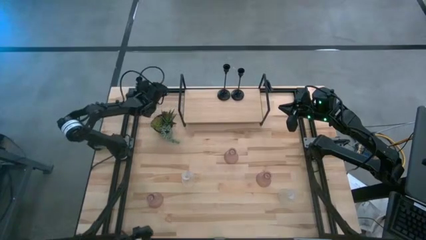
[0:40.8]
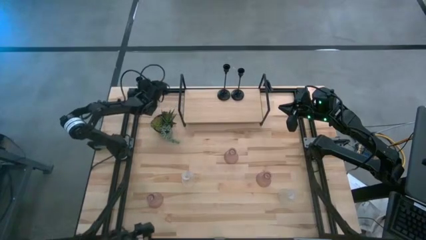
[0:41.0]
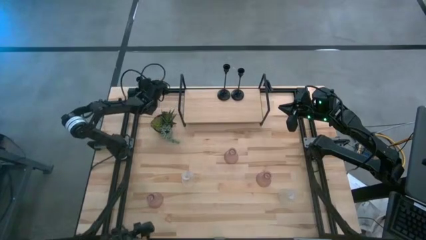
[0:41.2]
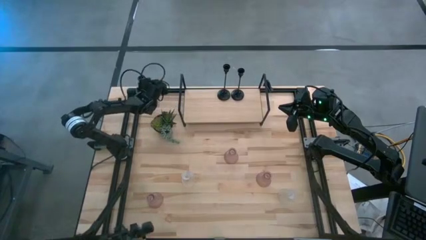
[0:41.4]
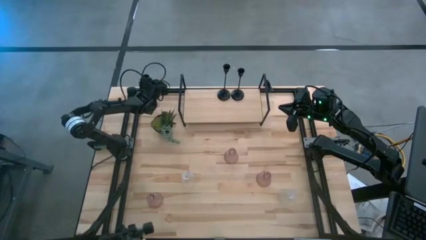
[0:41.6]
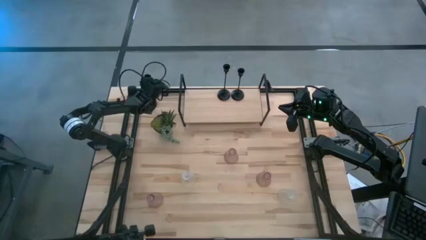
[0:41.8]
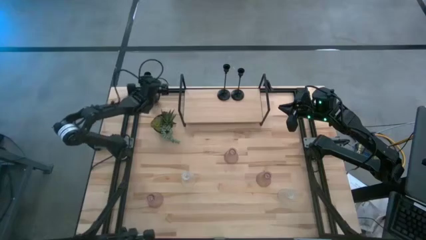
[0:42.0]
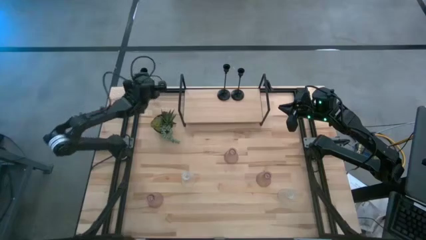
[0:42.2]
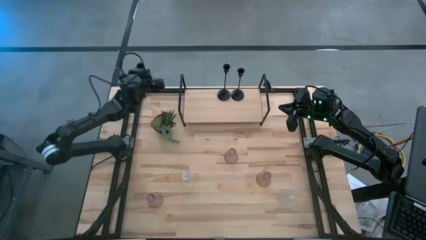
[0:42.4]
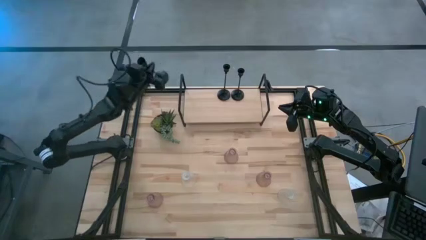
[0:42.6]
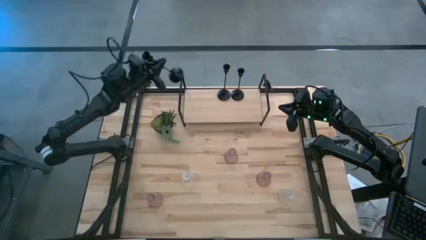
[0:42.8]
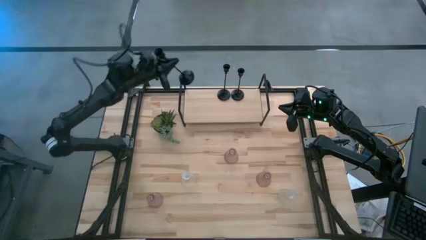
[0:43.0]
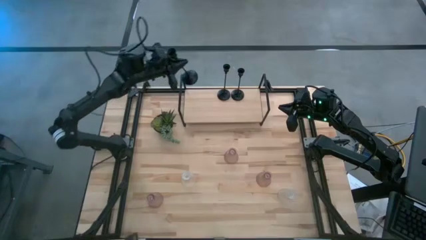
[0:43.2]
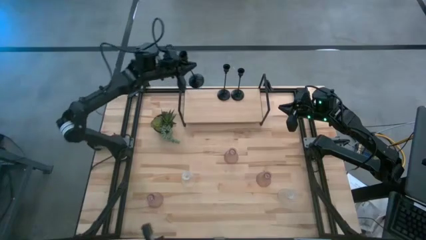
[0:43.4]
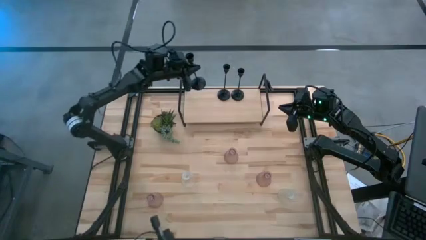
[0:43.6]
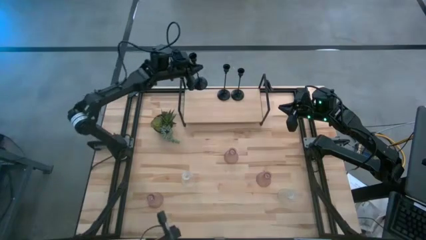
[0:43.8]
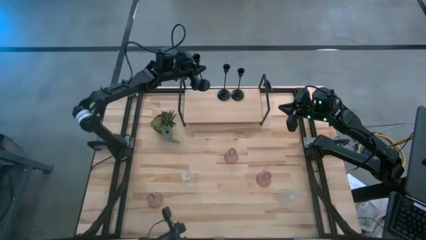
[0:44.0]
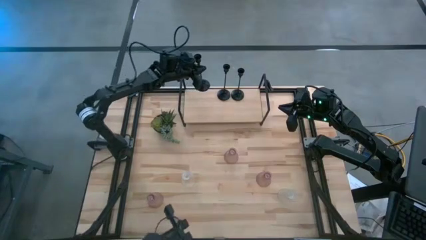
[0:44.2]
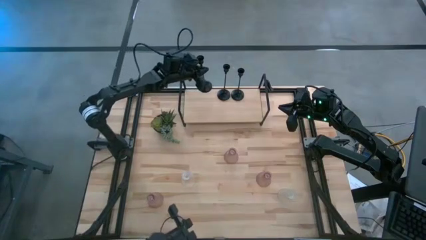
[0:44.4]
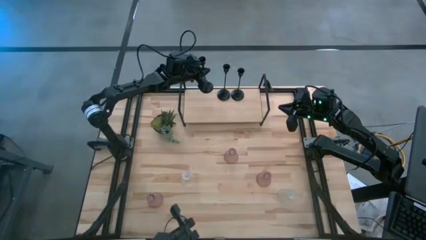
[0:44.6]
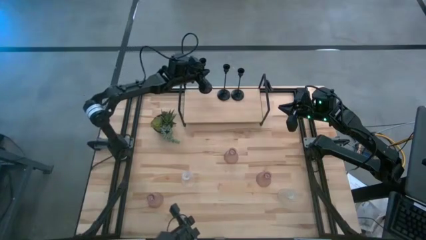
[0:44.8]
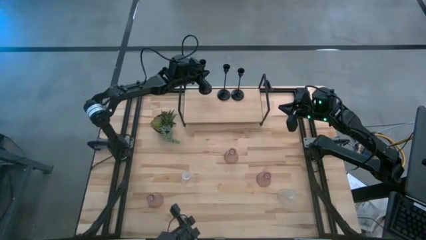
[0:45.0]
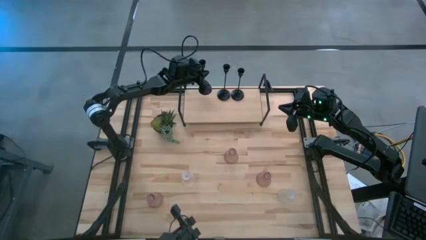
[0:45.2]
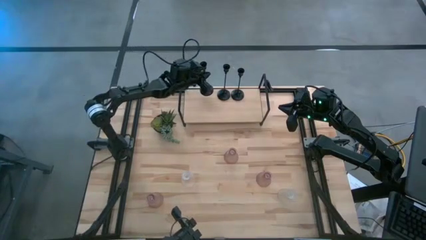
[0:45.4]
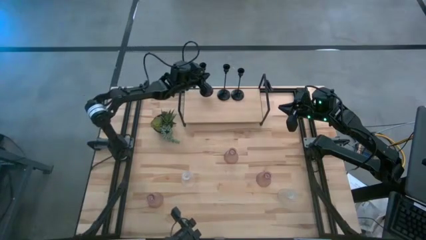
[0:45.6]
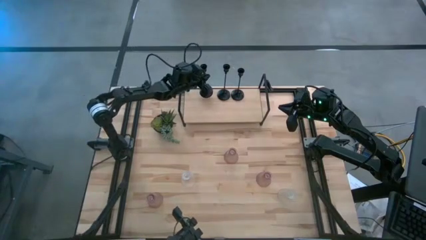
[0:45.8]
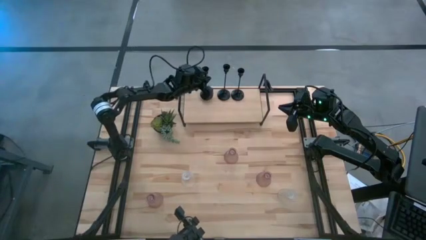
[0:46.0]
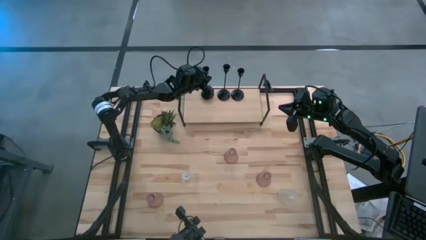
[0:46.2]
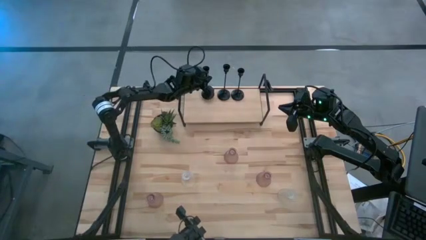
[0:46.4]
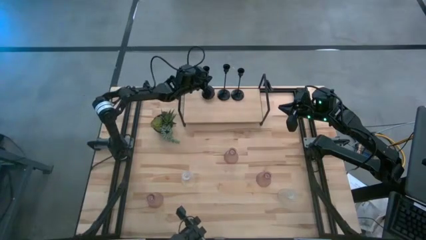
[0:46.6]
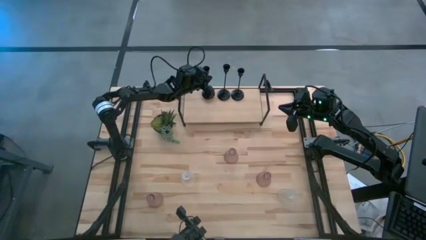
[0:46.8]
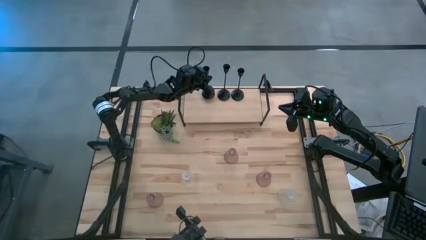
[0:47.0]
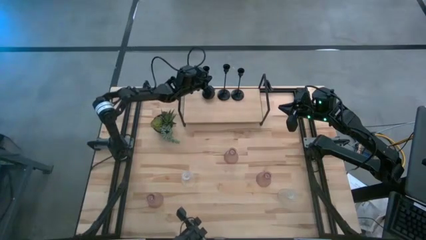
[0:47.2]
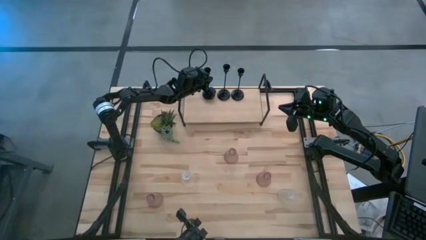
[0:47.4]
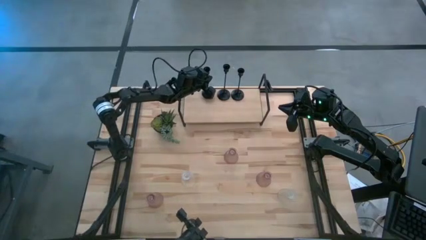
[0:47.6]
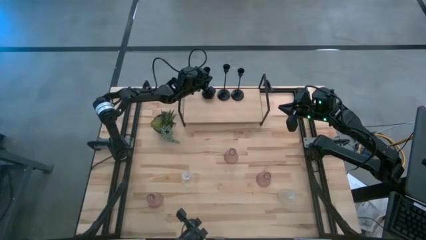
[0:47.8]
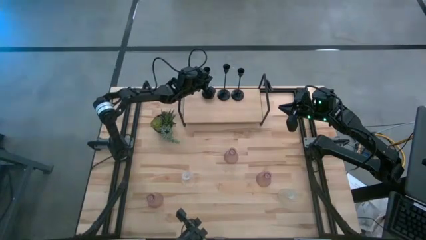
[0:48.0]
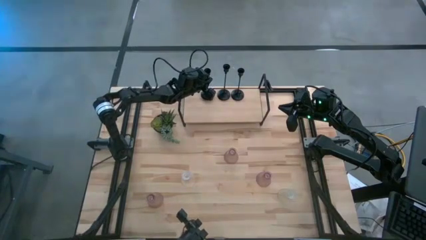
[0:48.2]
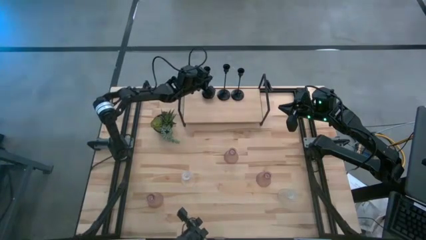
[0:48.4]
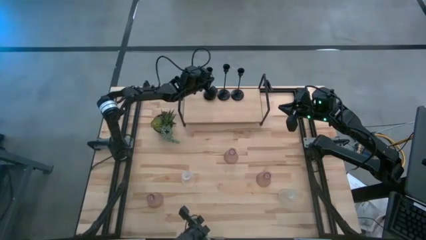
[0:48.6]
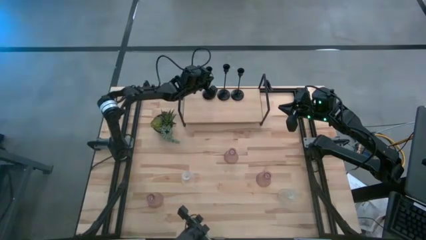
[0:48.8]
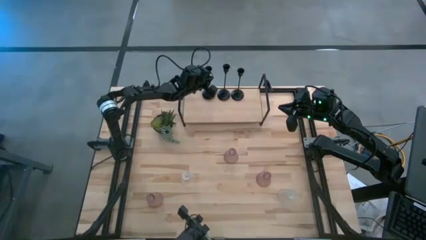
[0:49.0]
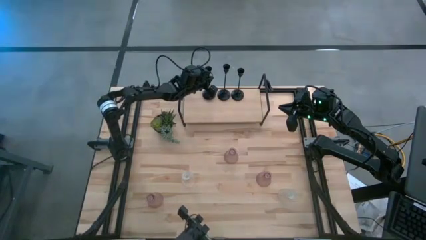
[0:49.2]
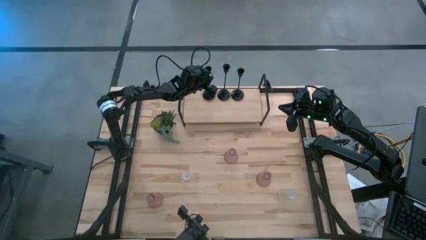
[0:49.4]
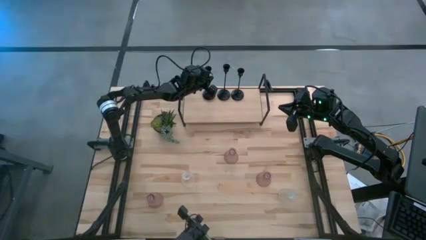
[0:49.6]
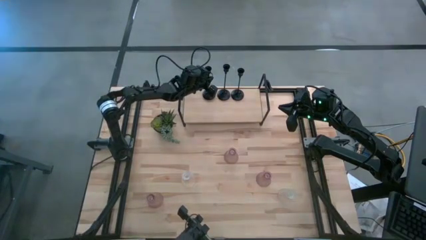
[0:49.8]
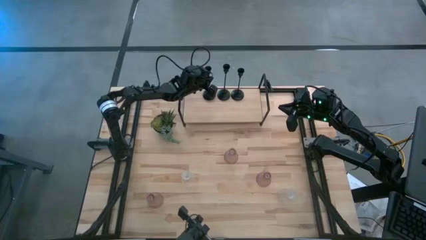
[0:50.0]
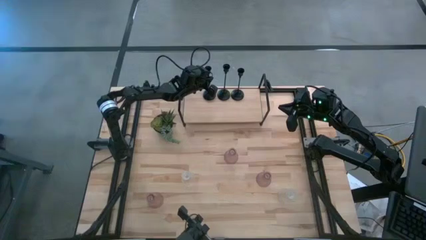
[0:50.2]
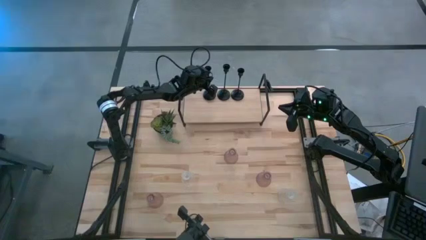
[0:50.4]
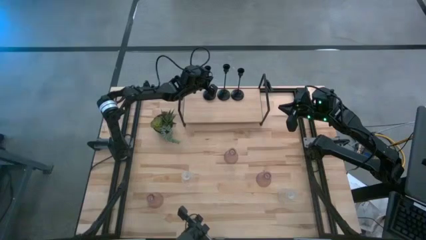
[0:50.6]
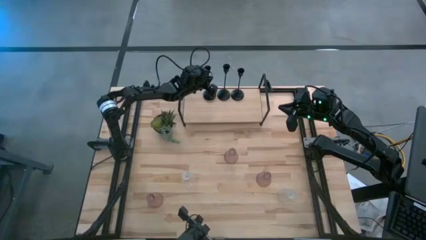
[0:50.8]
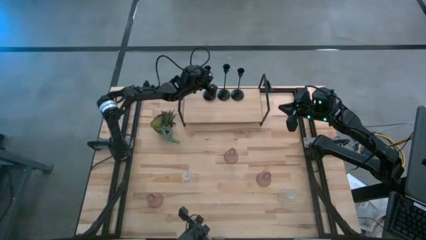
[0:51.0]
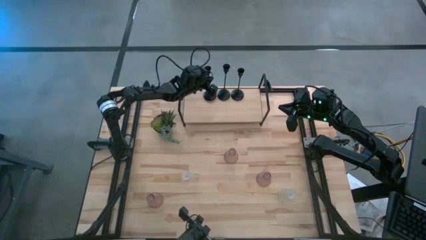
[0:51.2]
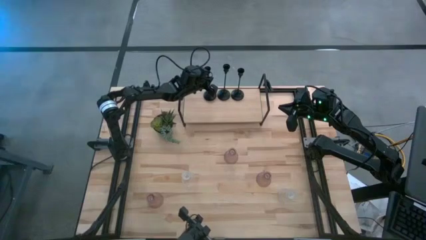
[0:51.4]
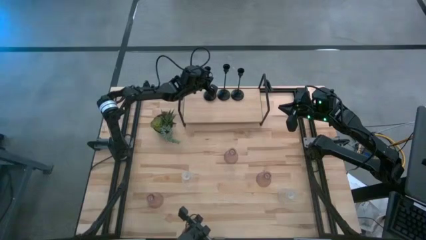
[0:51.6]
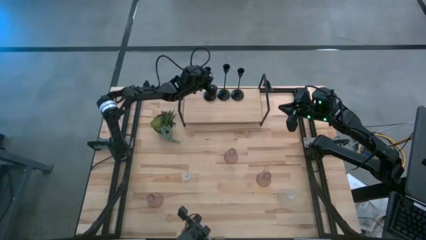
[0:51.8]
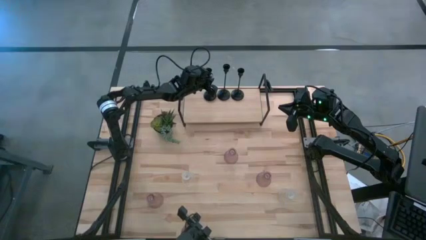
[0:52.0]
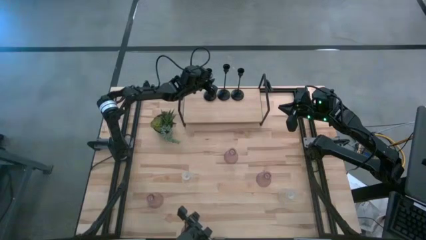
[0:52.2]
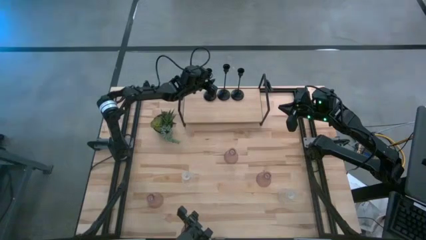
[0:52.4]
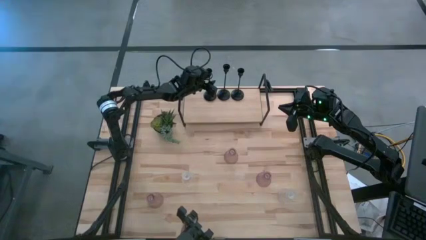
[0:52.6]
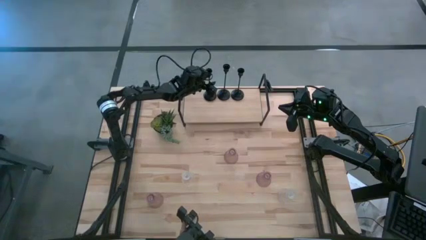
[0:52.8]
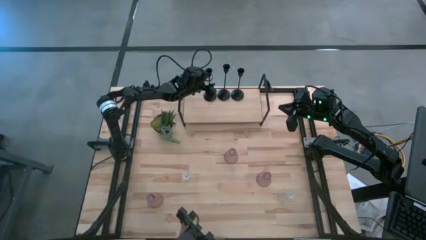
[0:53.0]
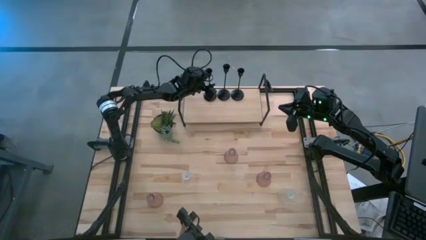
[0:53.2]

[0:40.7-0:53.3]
Task: Pick & Place candle stick holders
Put the black candle holder on the shelf aligned with the other black candle holder

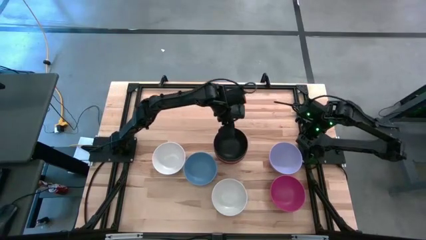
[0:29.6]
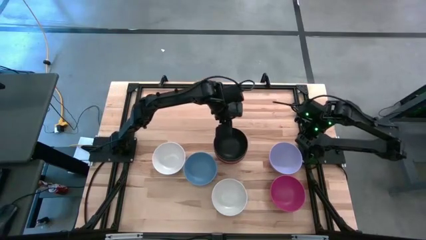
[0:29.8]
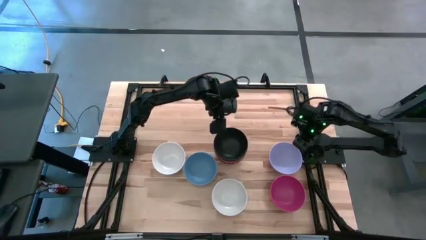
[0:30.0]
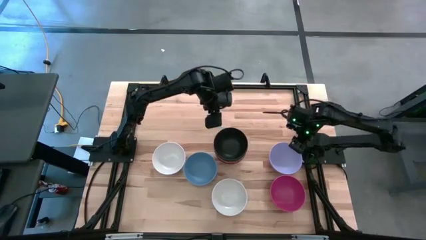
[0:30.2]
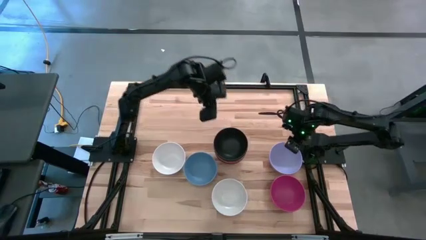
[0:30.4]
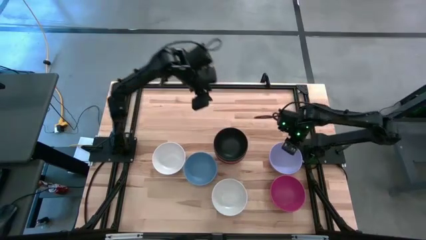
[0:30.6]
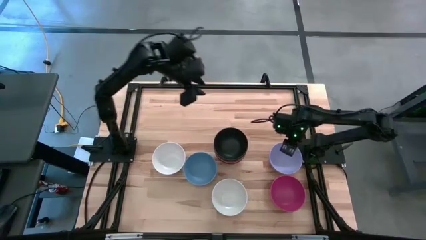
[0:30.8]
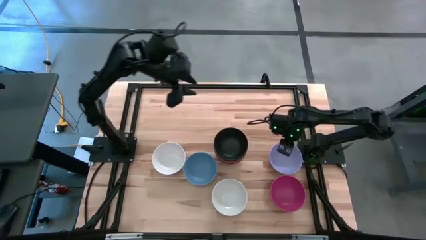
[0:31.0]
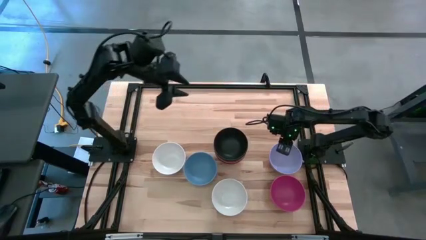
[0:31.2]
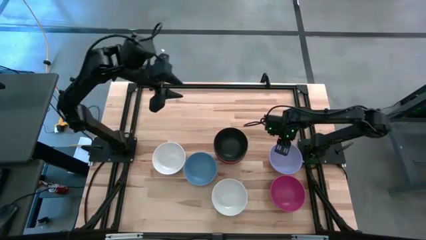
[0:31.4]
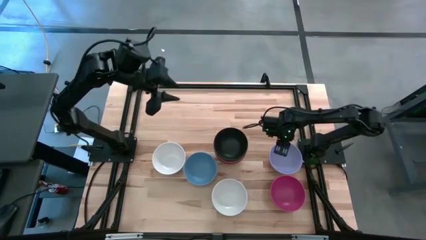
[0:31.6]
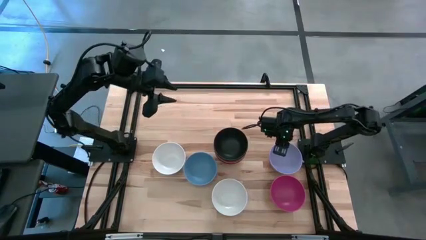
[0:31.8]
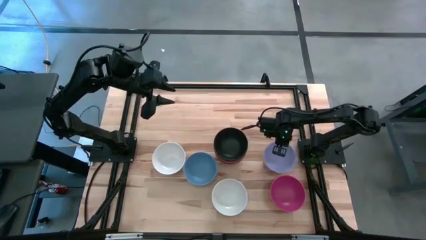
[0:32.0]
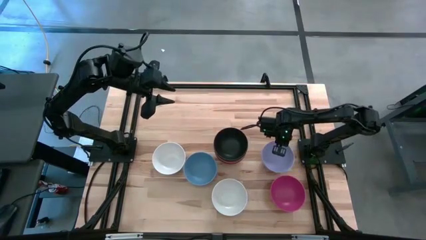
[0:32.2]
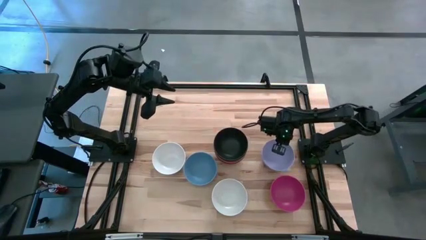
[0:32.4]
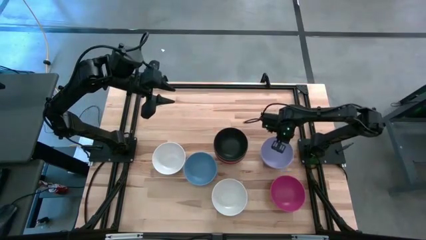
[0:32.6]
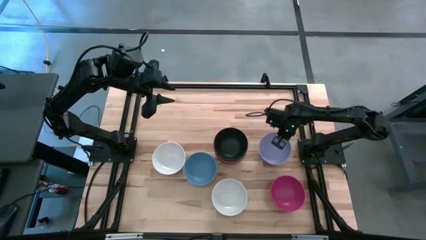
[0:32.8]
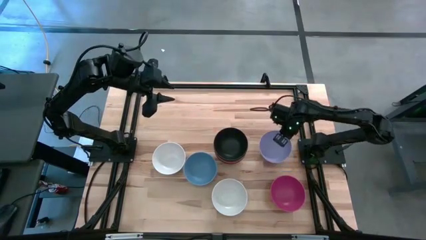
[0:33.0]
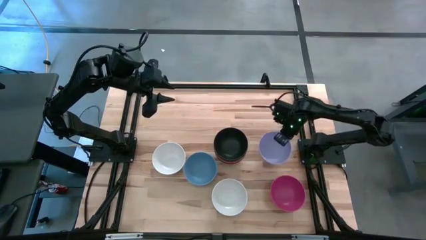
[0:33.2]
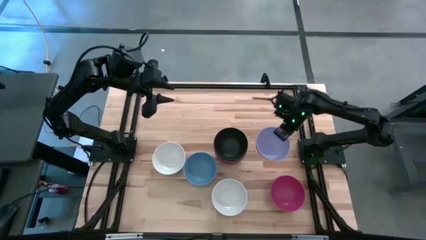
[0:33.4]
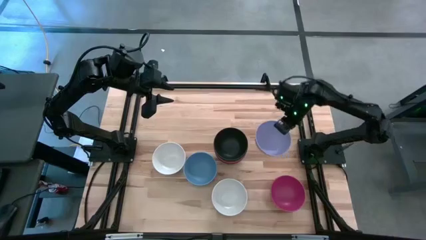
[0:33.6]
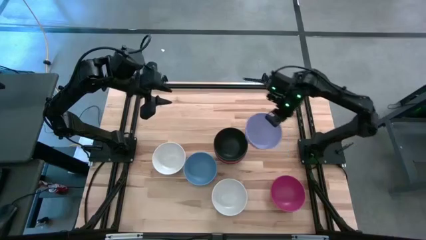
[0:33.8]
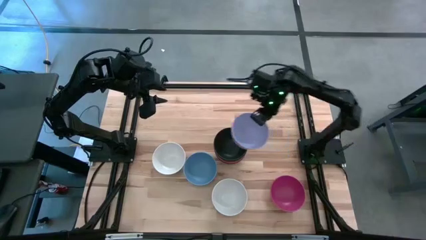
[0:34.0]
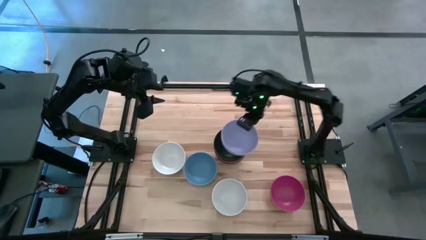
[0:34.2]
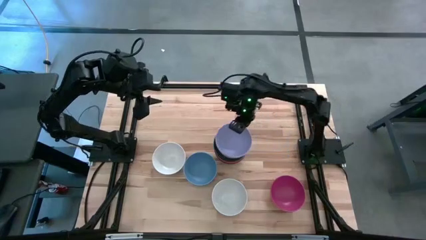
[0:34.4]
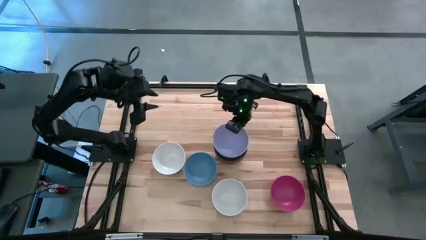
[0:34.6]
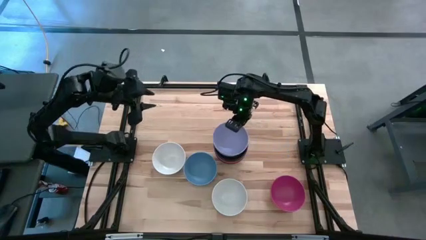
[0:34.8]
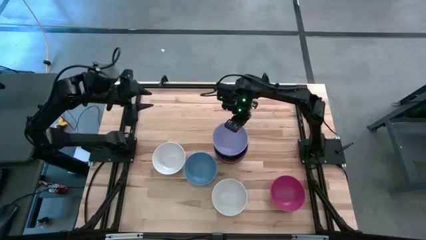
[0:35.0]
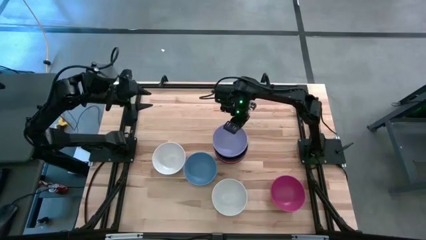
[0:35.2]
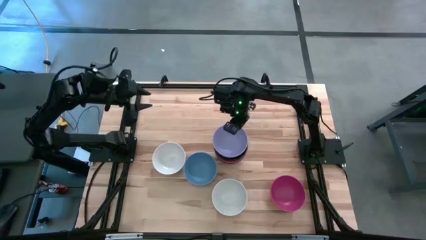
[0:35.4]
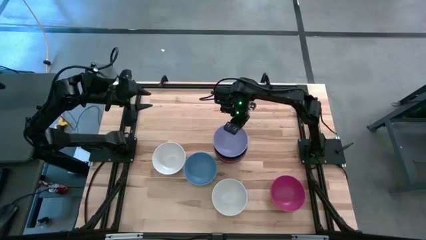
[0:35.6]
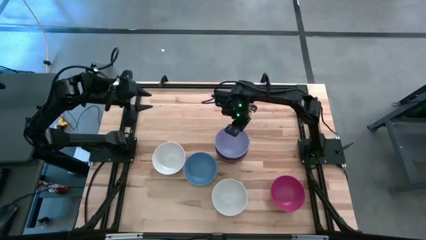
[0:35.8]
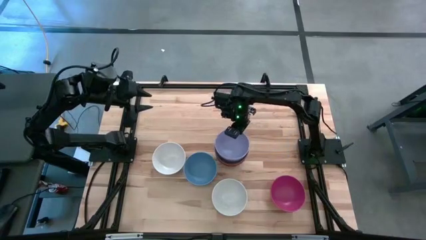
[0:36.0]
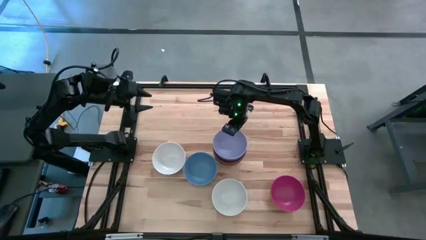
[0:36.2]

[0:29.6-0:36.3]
Task: Nest bowls inside each other
Stack the purple bowl on the black bowl
